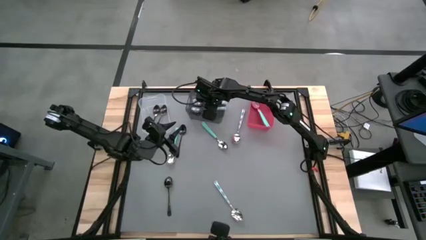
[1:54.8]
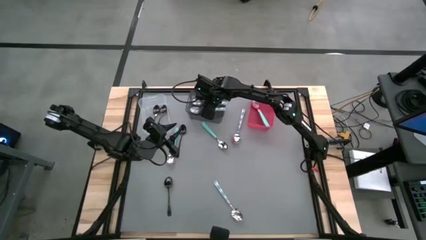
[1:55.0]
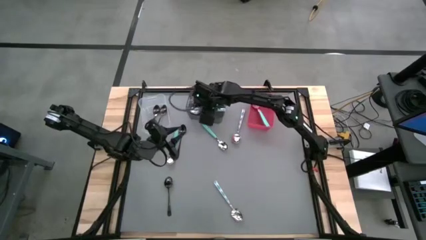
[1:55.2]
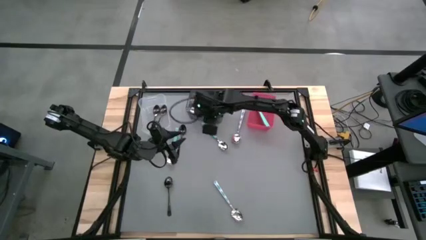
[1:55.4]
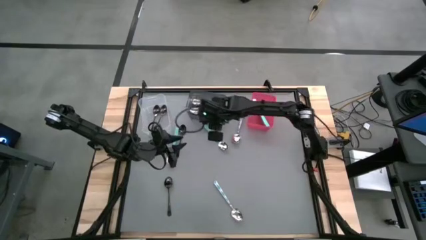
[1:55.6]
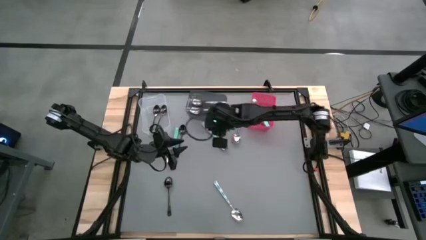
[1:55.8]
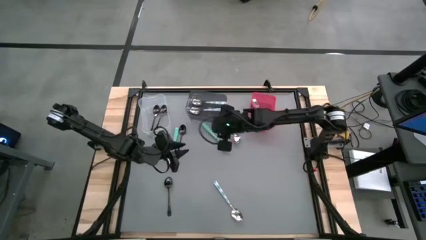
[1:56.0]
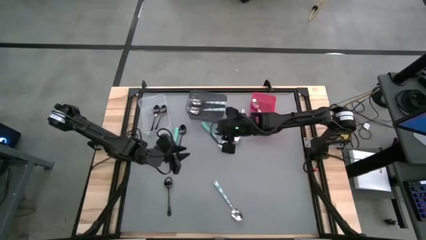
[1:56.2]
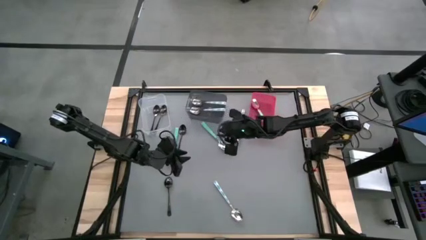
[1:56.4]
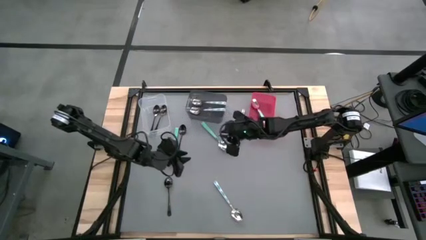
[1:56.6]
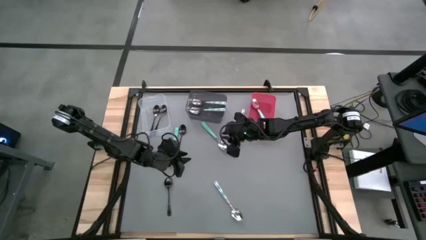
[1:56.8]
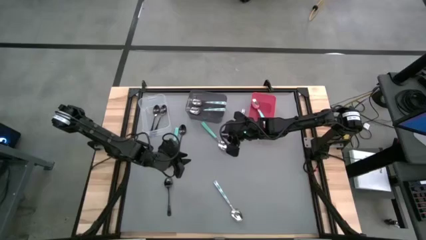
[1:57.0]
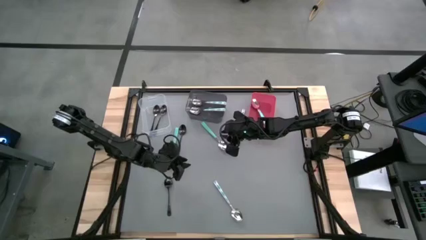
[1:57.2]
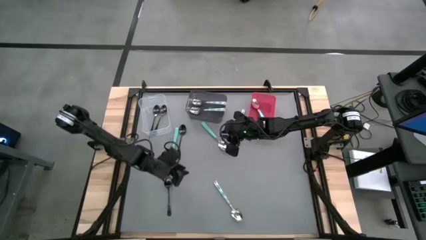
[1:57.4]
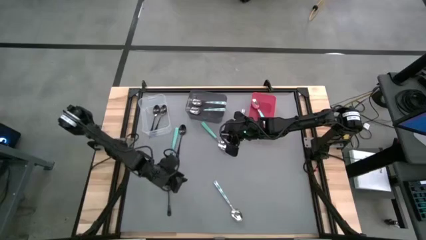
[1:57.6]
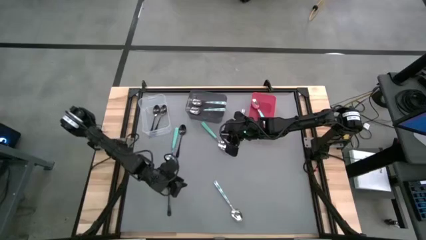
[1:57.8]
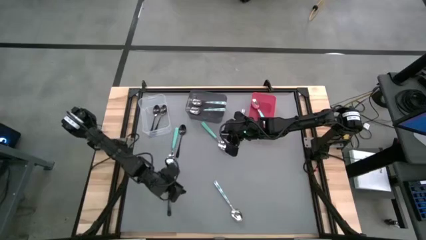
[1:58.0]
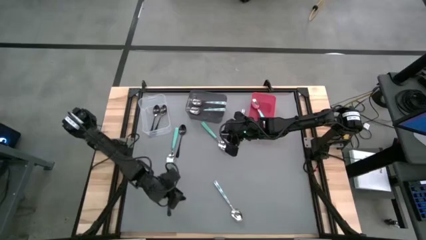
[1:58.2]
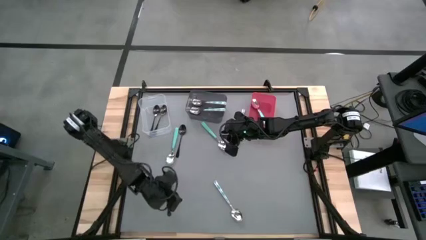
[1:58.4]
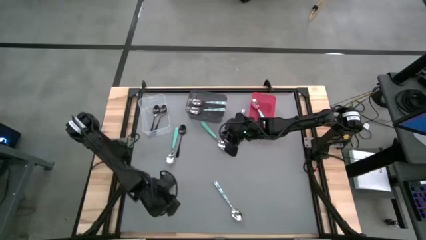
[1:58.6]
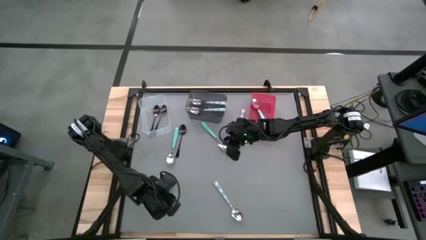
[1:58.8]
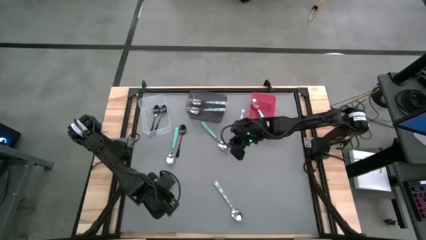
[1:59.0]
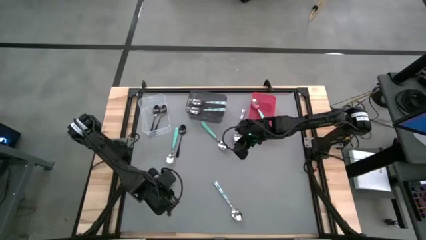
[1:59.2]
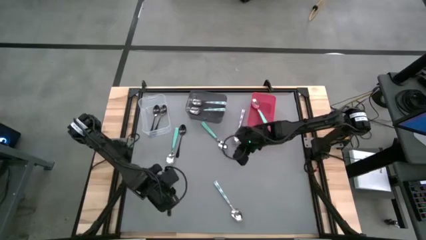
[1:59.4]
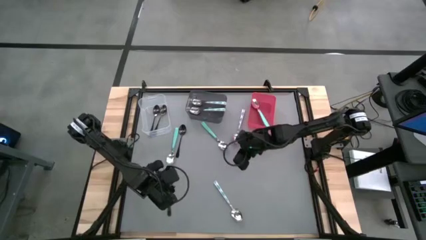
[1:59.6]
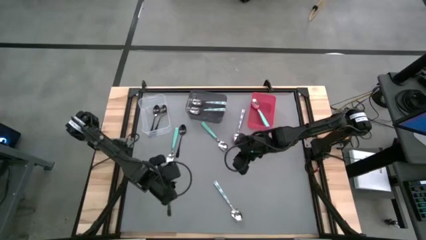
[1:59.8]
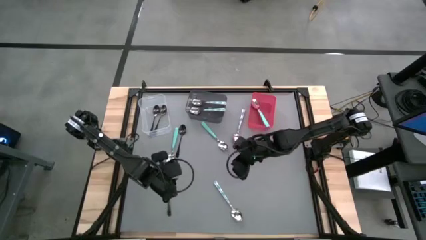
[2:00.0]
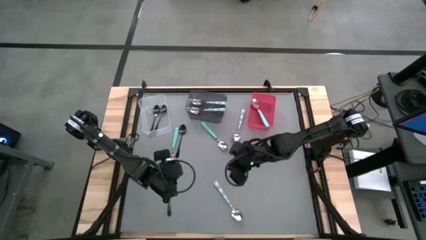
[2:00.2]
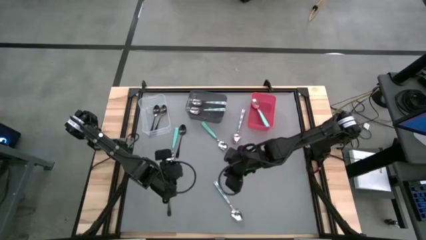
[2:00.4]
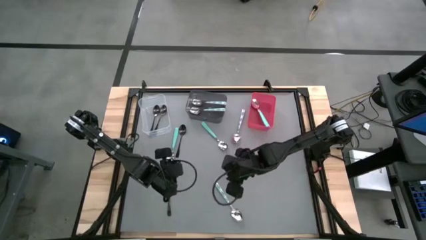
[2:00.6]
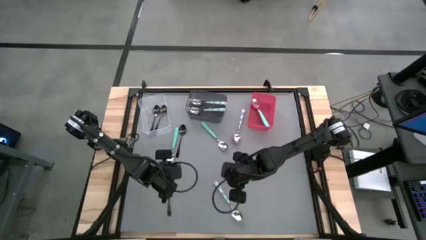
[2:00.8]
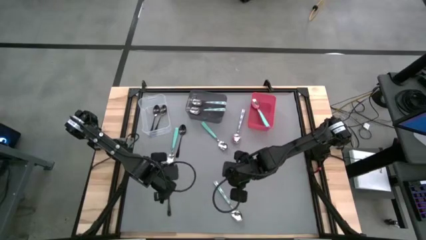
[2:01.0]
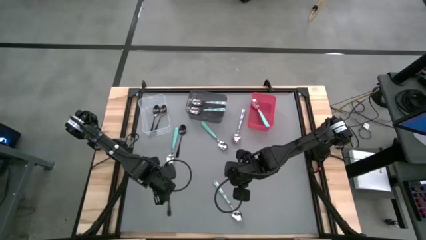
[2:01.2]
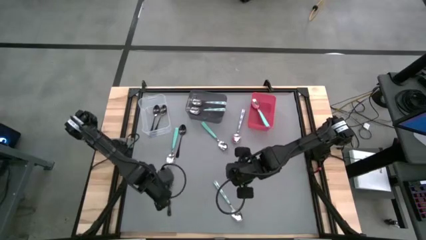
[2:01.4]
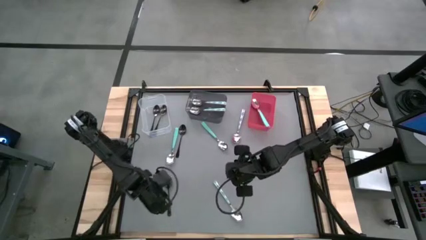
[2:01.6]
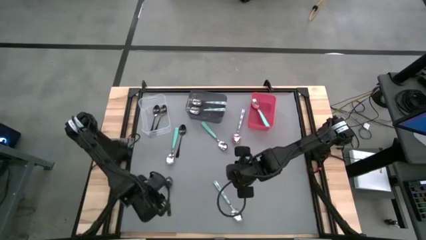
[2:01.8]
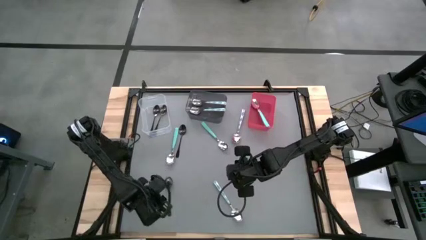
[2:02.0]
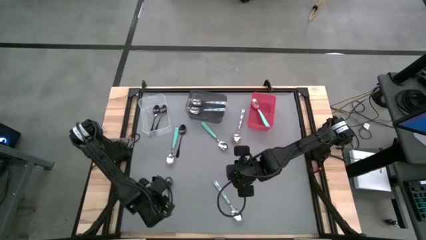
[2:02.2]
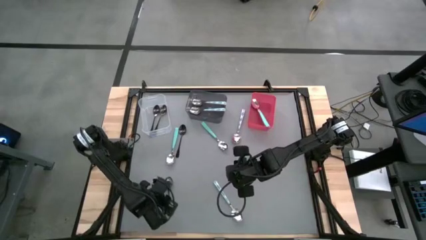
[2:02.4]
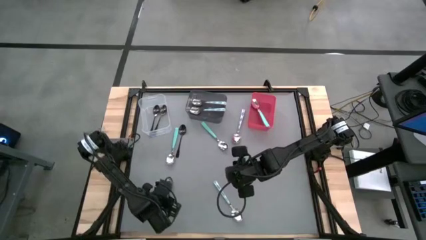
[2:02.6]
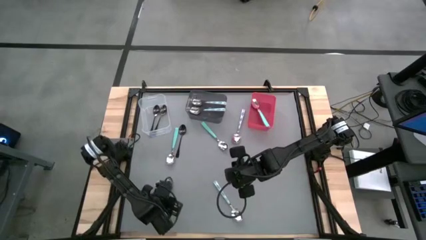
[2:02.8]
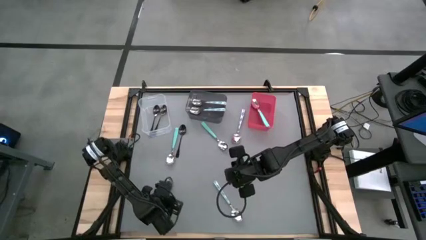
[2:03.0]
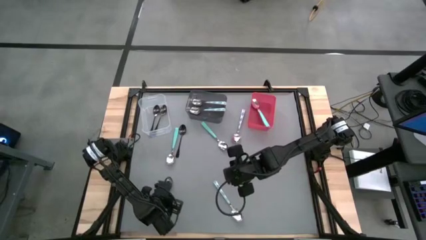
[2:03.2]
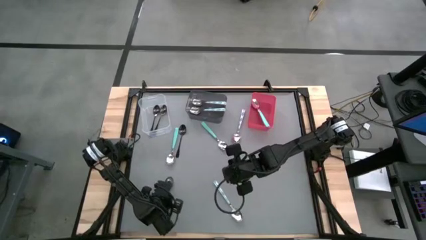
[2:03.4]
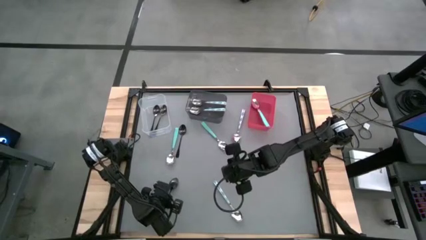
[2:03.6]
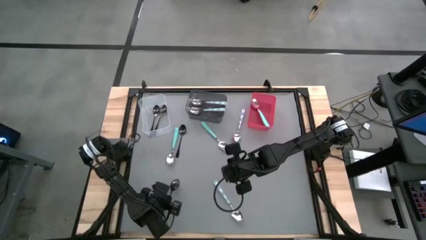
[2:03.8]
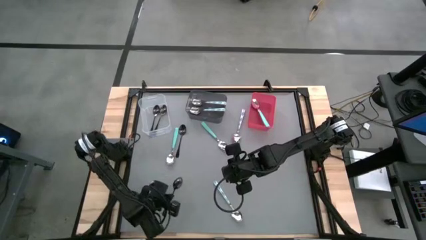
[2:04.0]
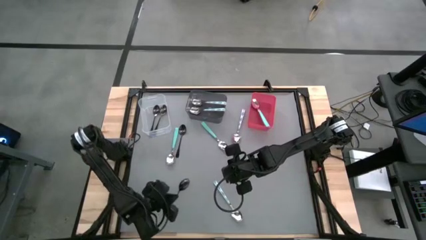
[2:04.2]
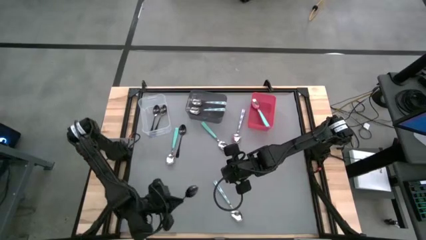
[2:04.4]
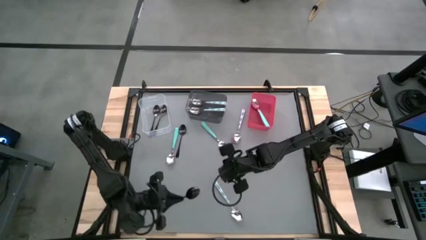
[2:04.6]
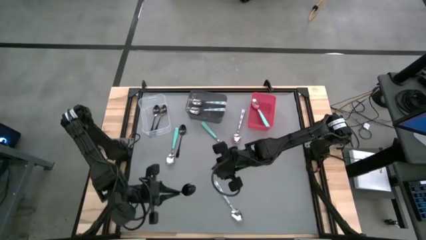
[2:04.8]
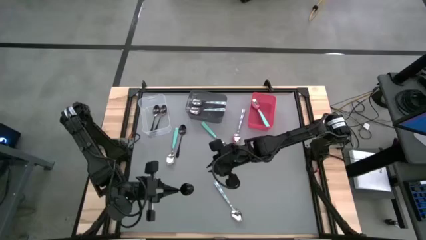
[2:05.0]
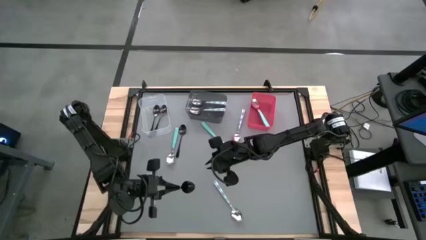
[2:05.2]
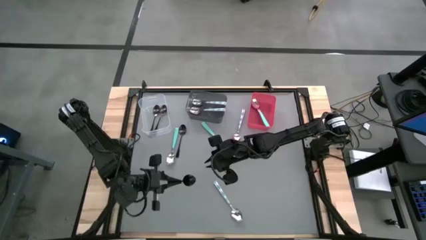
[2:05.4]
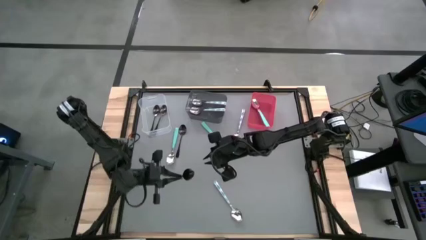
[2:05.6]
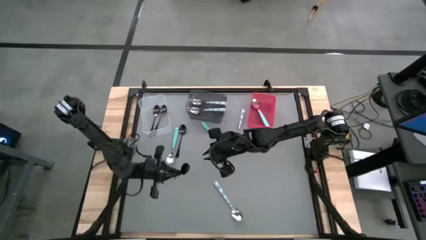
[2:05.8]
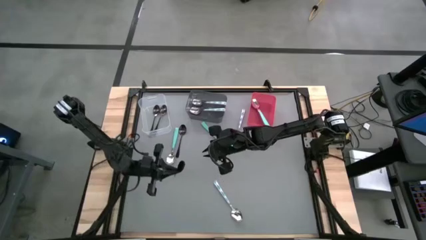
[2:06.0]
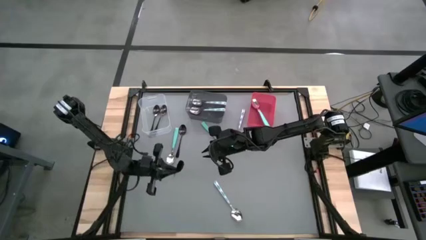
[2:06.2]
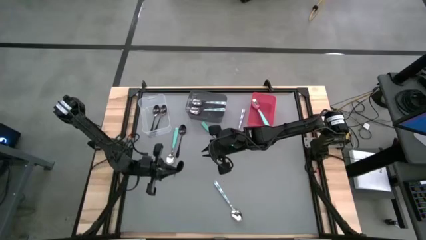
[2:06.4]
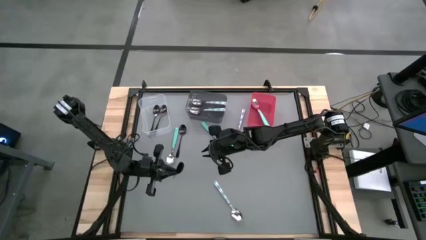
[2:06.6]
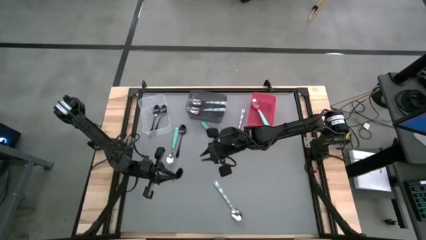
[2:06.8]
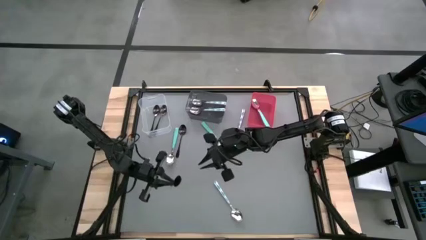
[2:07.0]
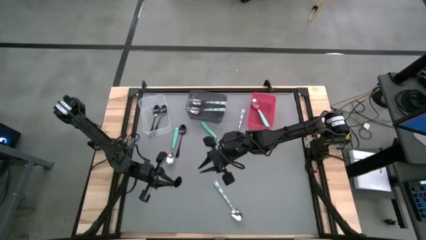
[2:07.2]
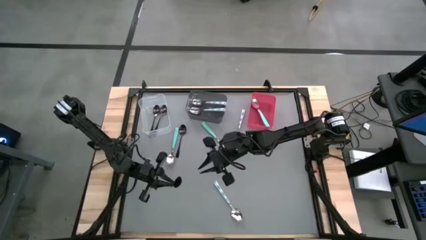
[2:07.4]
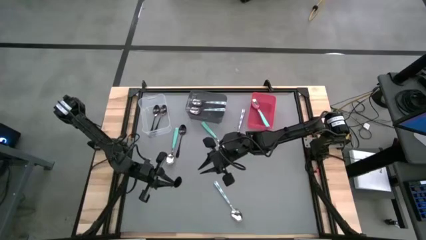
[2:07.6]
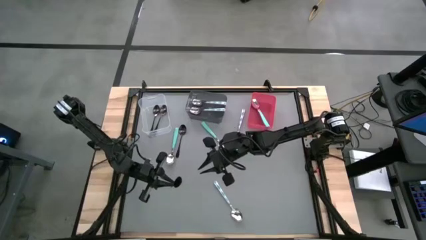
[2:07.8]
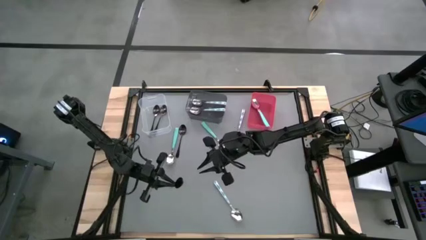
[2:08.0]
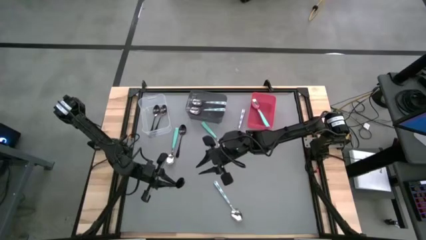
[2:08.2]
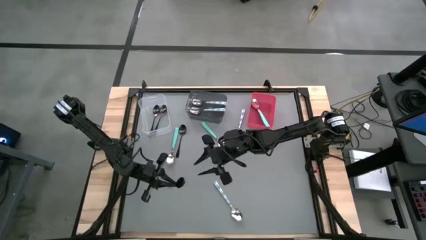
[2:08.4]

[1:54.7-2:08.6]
Task: Sort silverware by color (type)
Put the bottom black spoon into the transparent bin

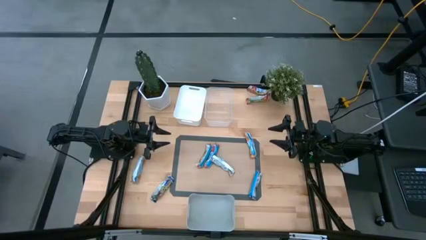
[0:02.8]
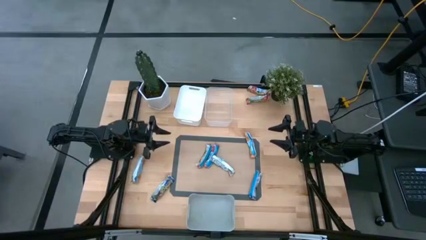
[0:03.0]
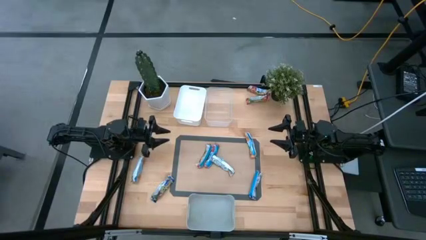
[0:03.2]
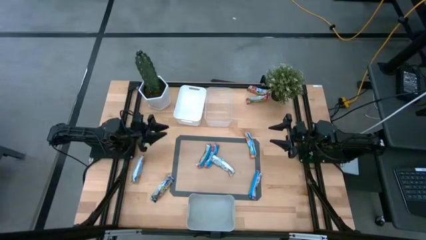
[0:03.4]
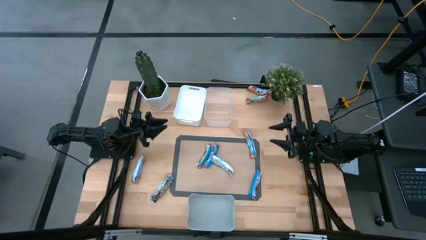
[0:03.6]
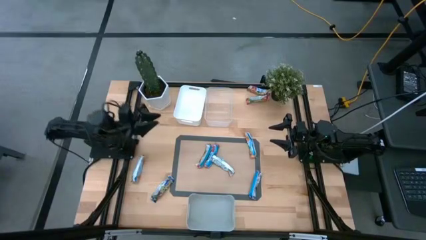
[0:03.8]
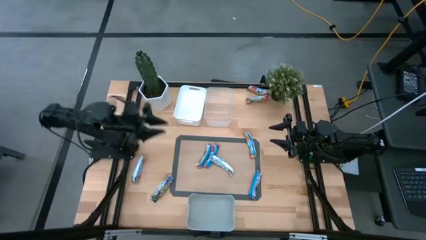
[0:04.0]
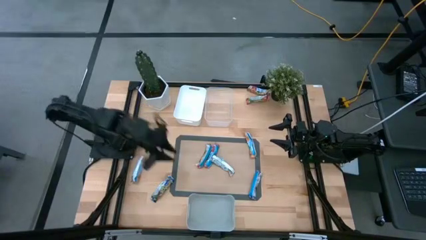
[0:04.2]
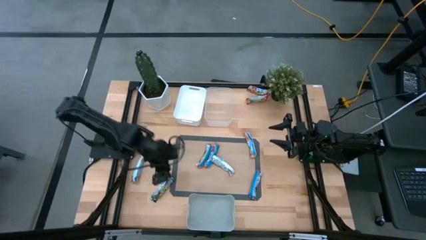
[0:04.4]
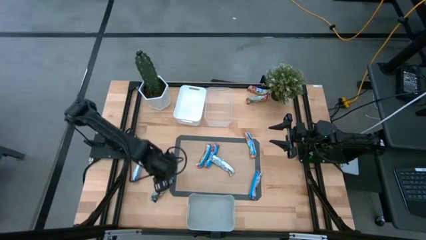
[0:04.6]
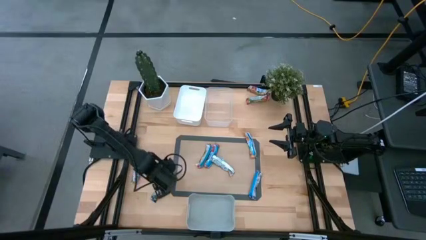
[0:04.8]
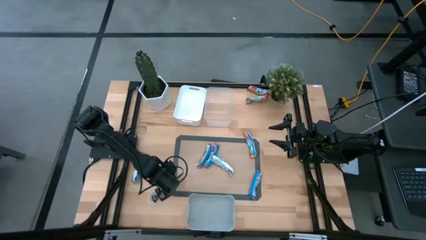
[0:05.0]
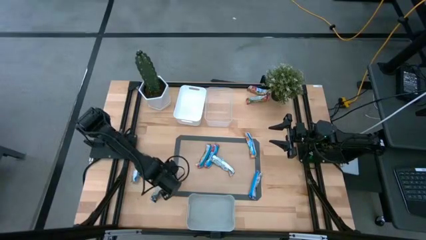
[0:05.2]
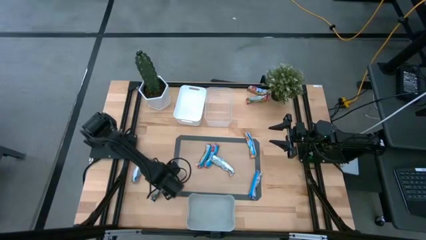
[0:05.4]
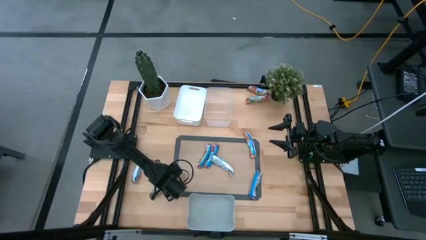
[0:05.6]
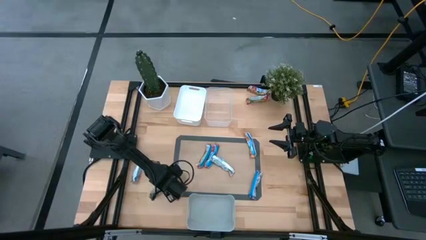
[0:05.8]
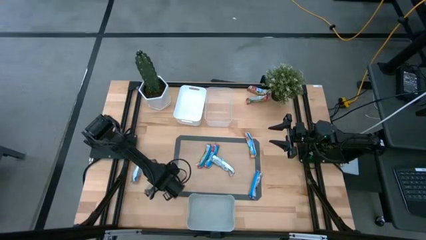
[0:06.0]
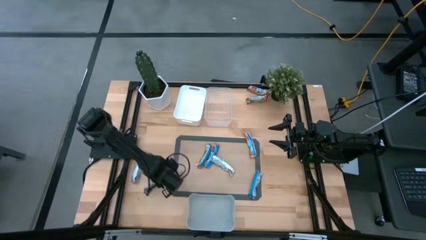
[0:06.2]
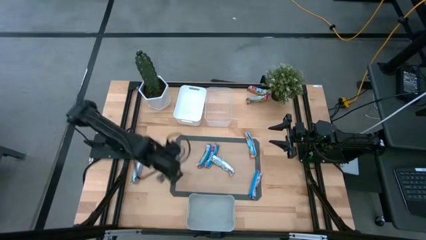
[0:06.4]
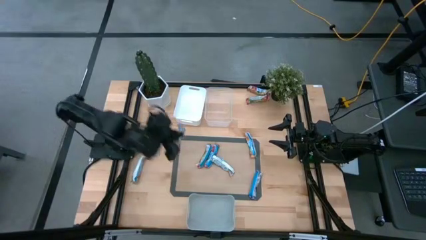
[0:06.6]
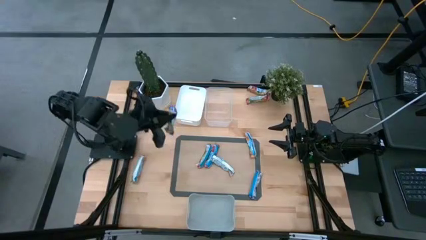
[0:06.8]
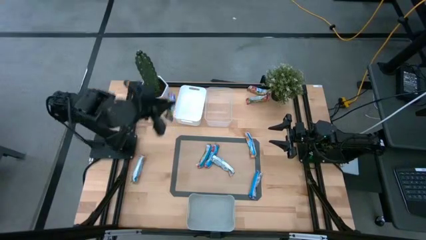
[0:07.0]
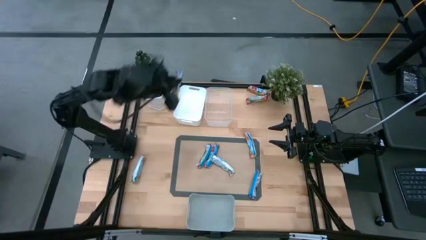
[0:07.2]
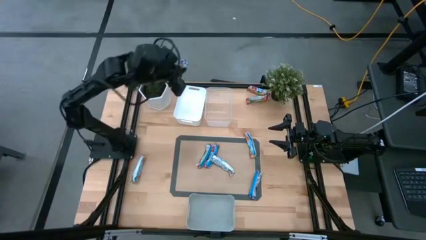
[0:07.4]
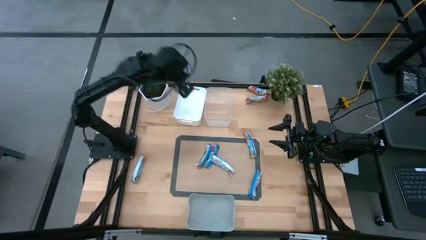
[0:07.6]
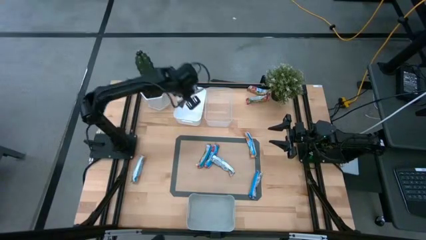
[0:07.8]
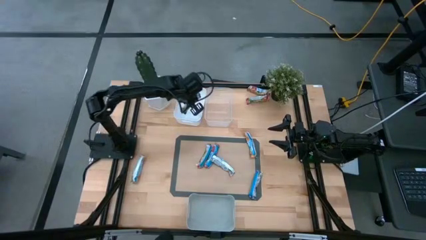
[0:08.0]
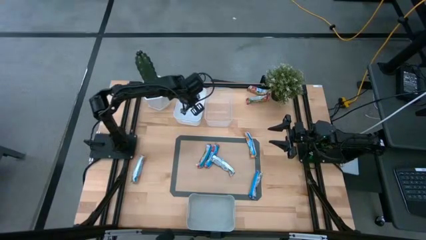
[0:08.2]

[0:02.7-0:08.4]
Task: Pick and place Granola Bars by type
Put the left blue granola bar into the white bin
